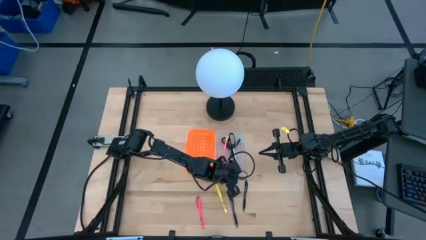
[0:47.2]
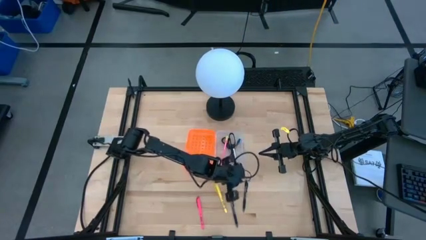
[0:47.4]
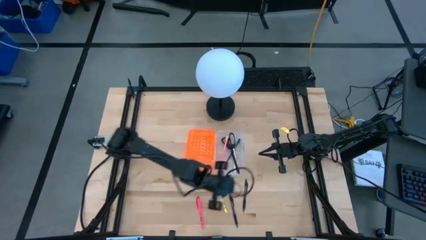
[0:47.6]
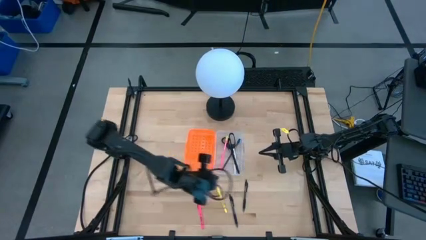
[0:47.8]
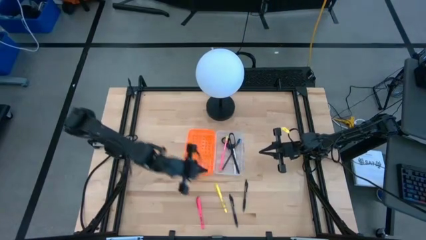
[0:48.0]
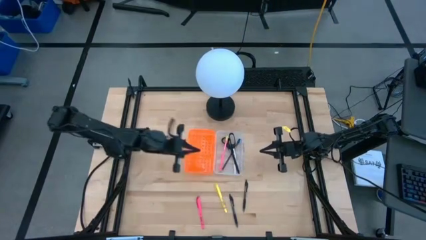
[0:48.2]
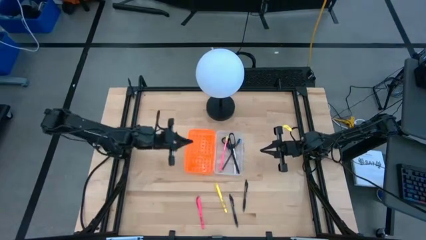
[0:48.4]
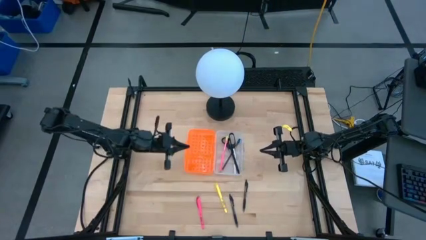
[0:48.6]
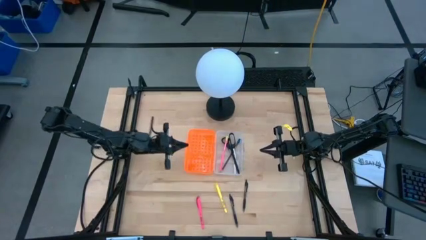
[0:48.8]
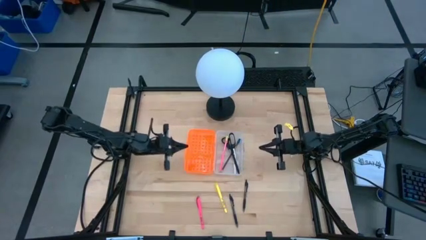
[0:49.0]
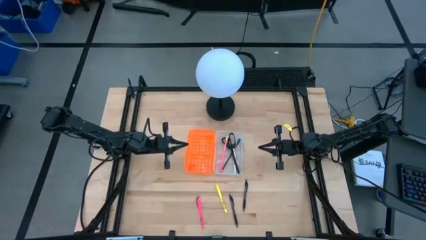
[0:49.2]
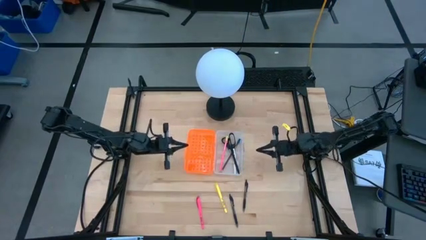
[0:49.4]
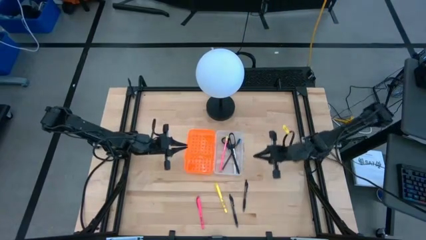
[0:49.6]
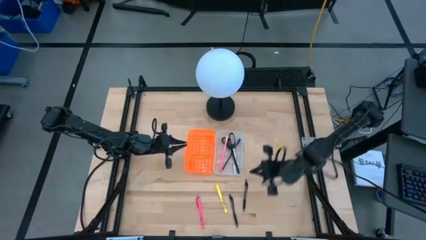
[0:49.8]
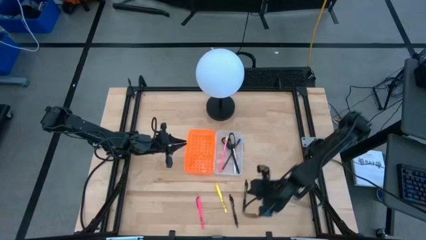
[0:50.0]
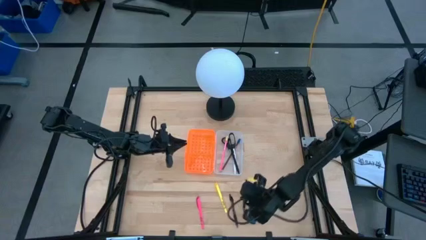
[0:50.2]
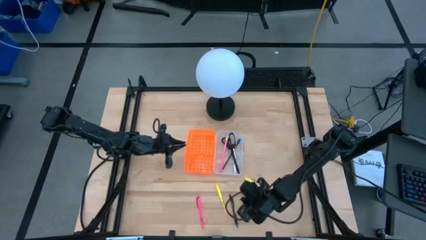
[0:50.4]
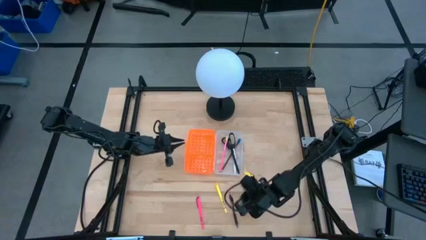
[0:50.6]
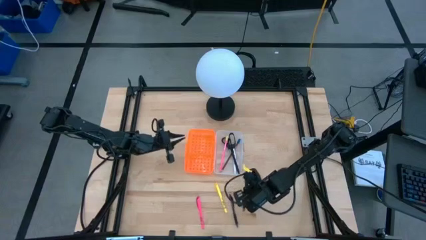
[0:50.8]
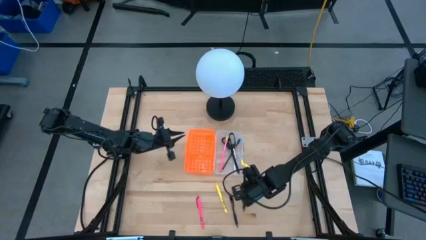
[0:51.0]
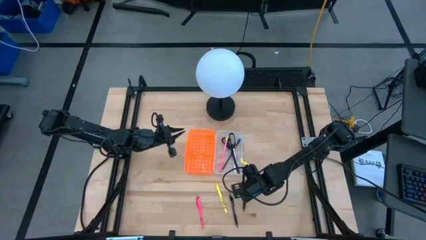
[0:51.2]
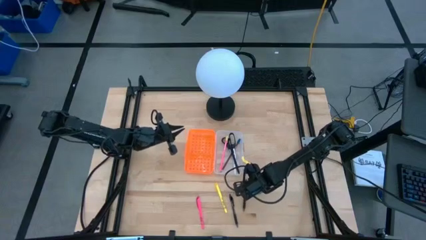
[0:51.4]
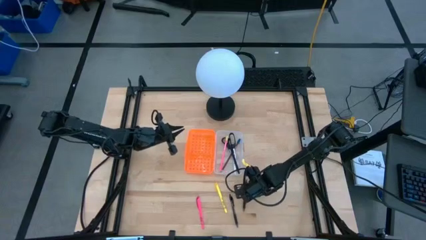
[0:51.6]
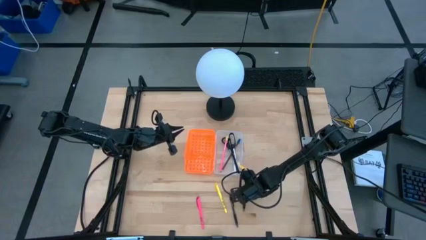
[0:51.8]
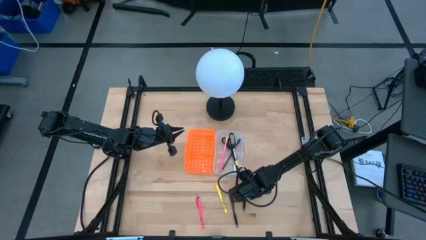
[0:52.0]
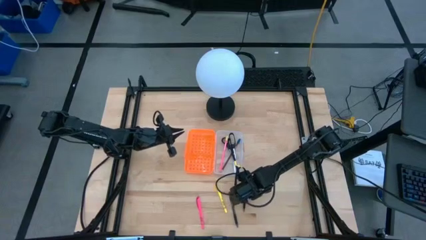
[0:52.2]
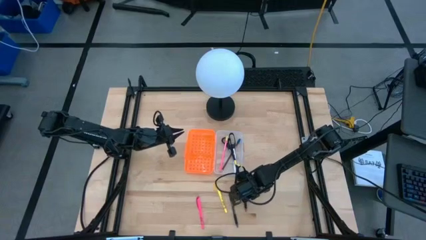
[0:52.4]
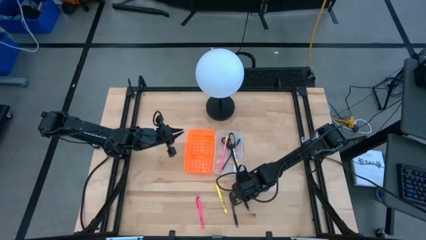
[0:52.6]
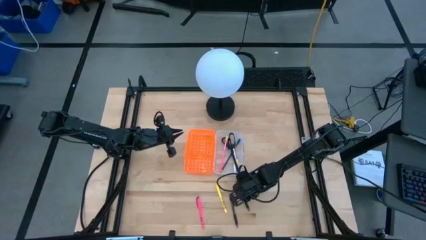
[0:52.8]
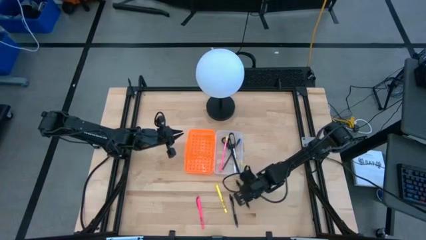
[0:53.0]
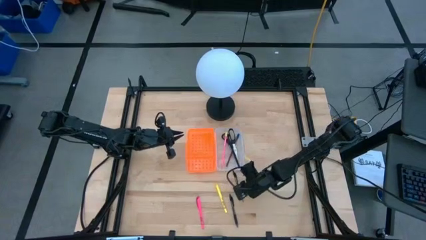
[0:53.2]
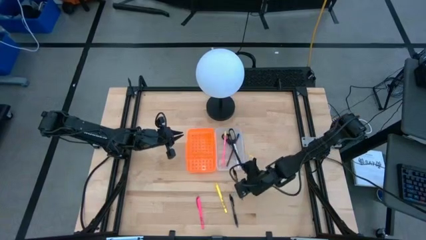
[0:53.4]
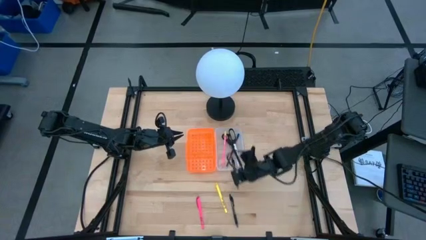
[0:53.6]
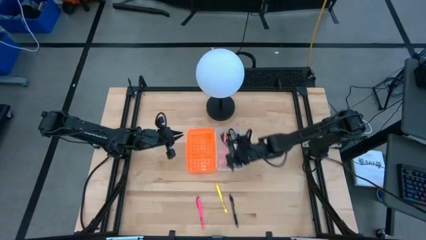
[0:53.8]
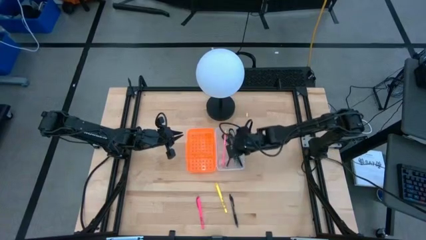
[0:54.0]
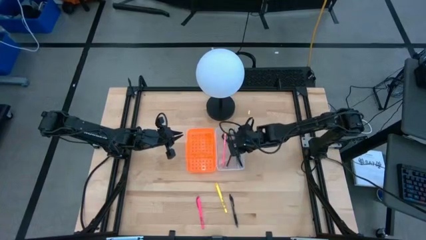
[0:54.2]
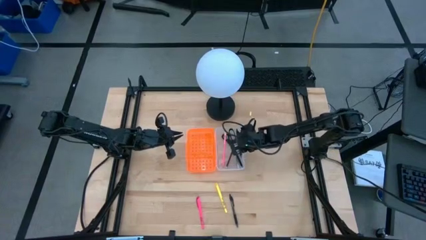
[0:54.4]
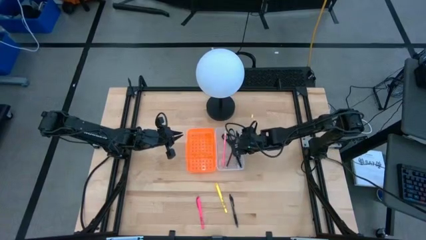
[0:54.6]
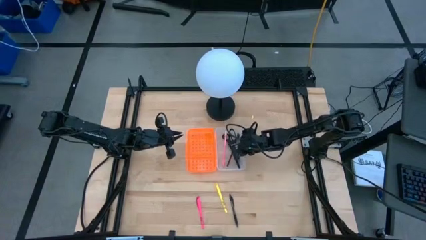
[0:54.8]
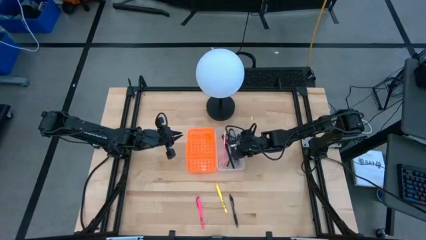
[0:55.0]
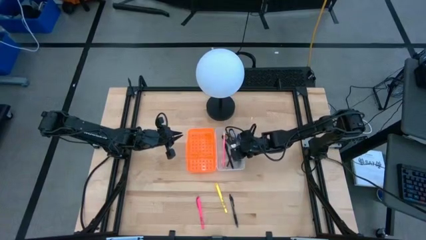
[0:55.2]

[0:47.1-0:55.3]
Task: Pick & place school supplies into a supply box
Put the right black pen into the pencil box

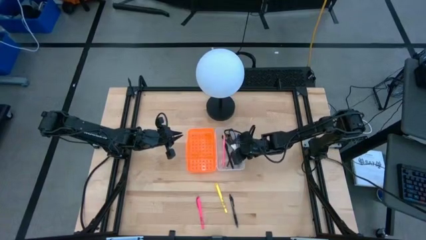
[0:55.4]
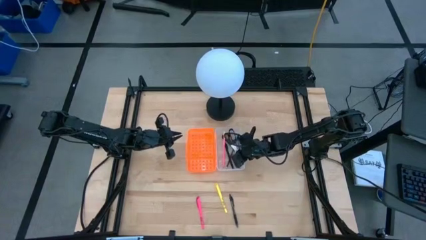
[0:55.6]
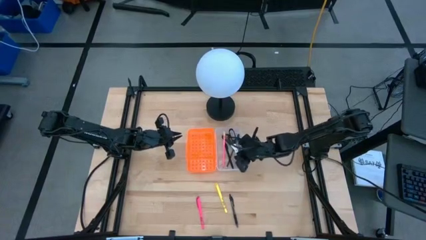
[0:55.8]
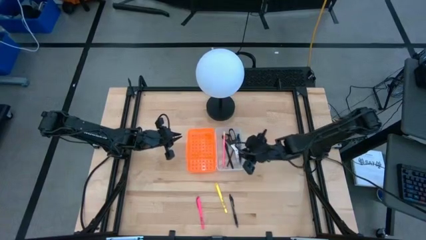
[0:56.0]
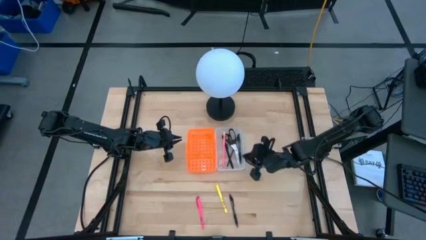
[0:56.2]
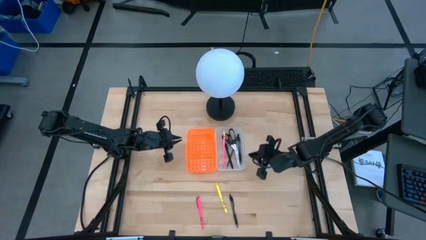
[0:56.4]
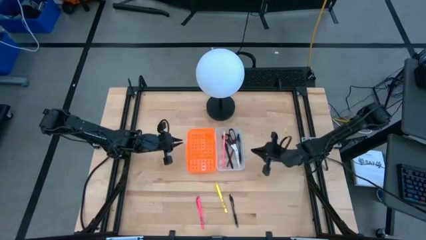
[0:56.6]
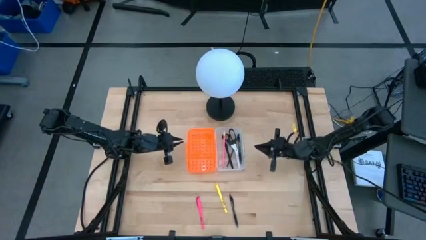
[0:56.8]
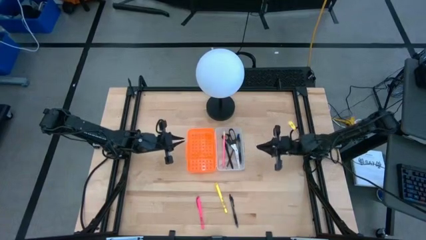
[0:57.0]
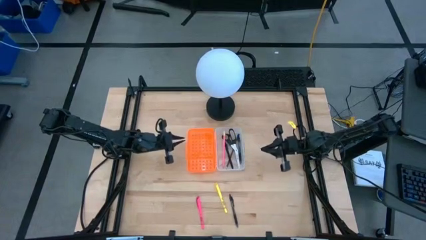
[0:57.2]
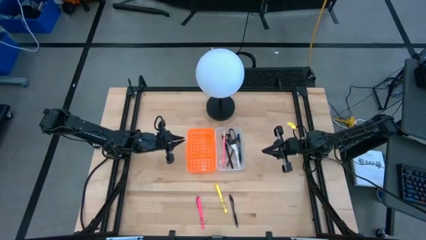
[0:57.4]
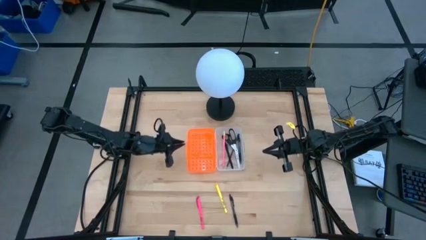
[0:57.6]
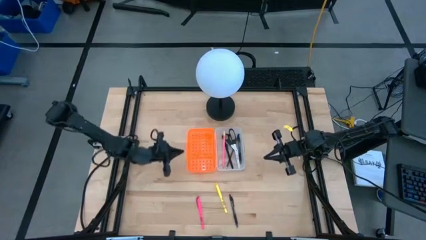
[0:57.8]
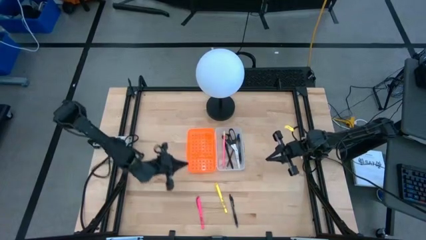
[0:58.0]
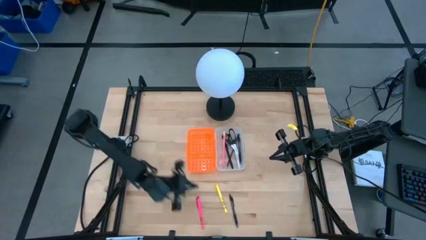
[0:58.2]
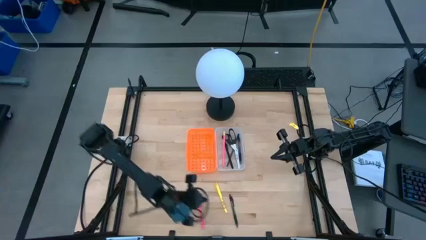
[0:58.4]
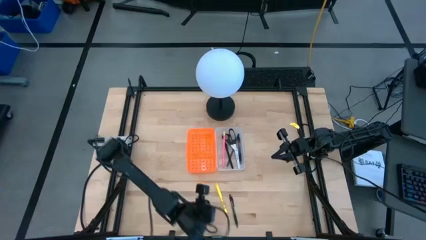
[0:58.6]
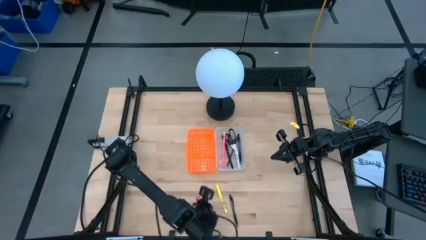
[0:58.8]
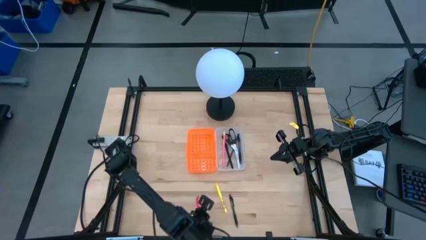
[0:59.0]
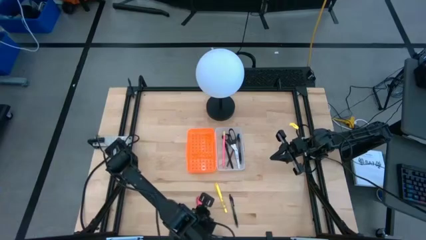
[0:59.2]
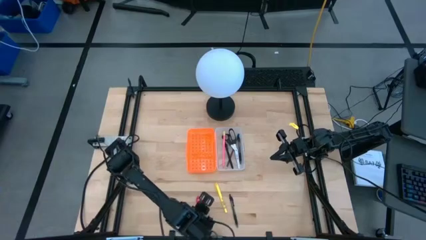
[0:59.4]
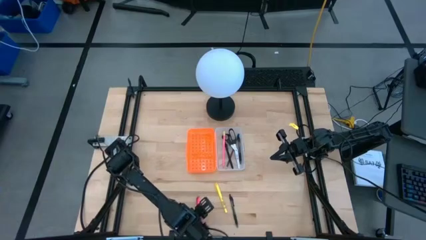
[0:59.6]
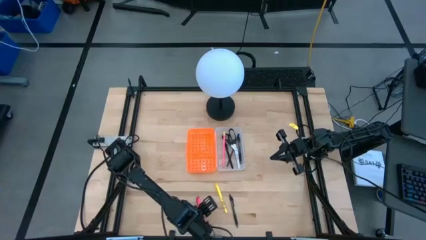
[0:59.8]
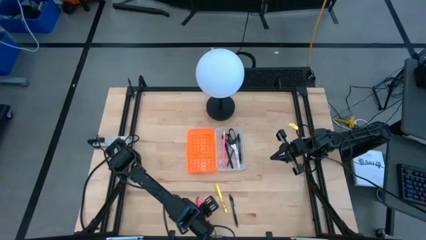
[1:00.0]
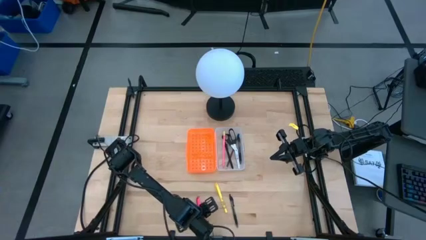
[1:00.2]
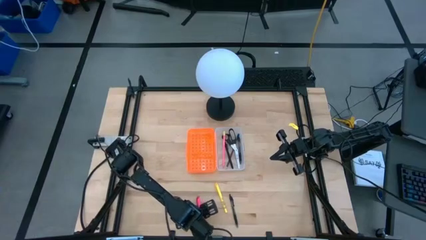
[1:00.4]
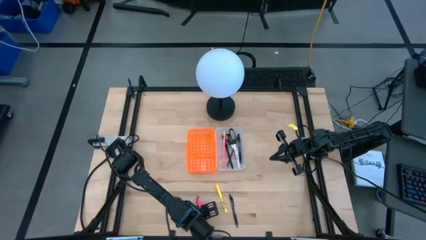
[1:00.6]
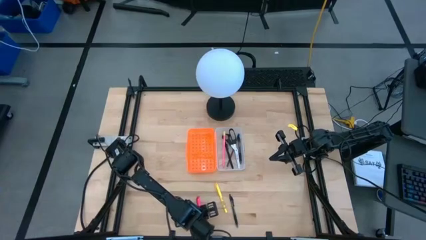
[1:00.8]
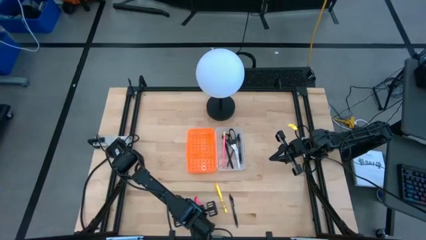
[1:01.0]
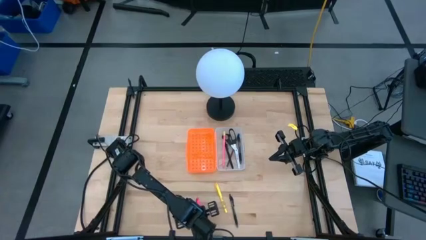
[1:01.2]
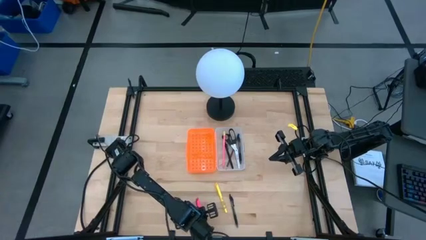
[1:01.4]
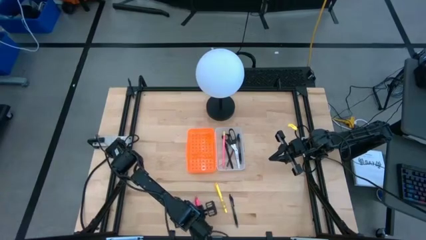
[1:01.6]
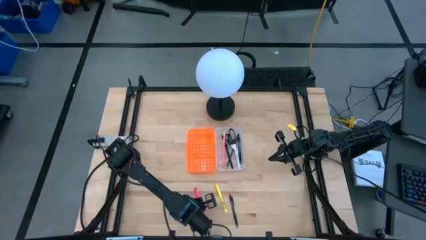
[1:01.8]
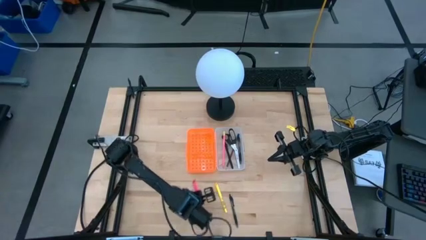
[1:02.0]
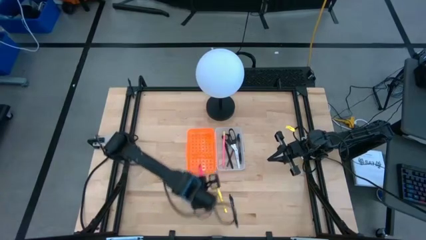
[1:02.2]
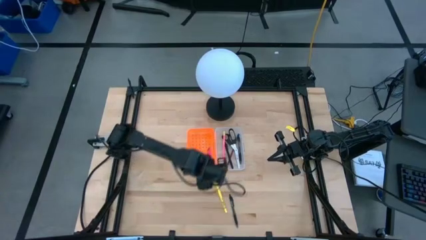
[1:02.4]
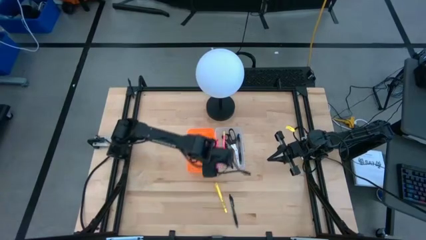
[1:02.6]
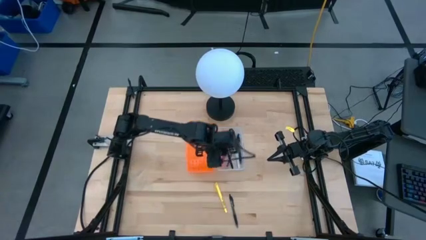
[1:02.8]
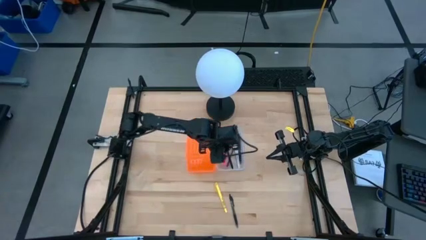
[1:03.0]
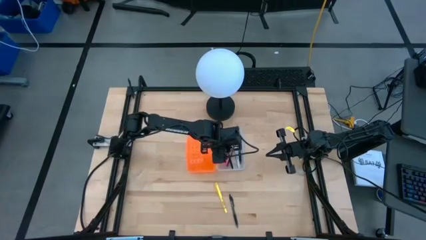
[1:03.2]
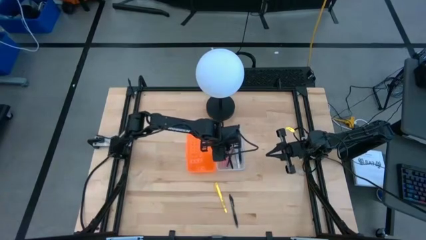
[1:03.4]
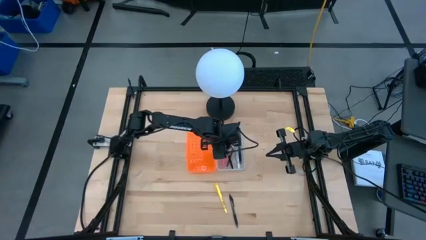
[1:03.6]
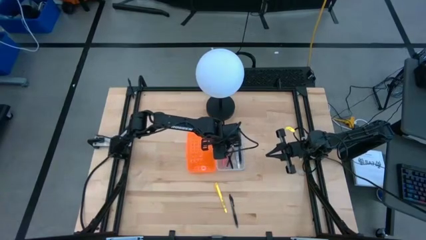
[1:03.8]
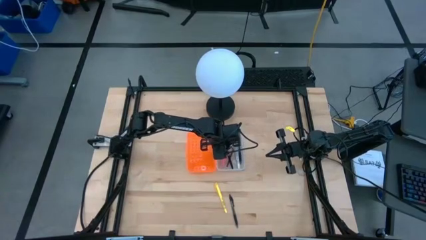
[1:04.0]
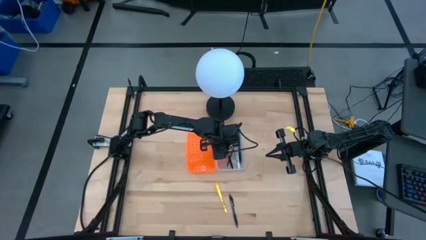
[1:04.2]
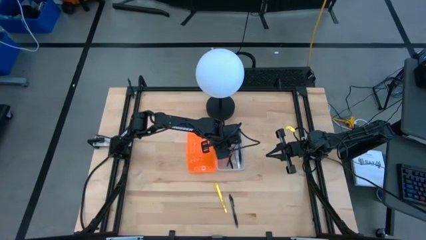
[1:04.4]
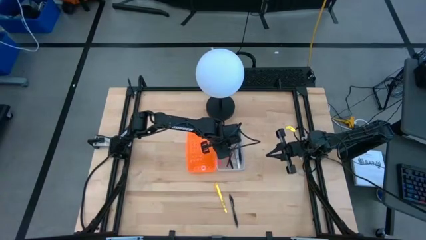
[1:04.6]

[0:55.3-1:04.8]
Put the pink pen into the pencil box
